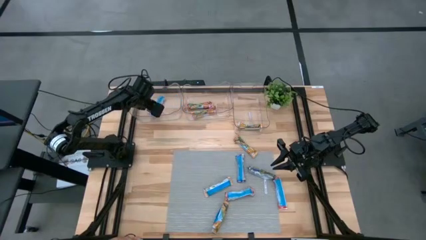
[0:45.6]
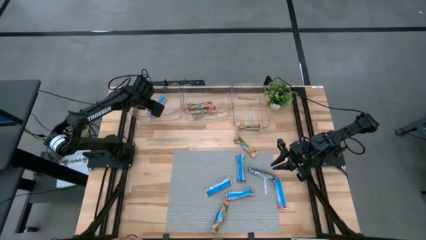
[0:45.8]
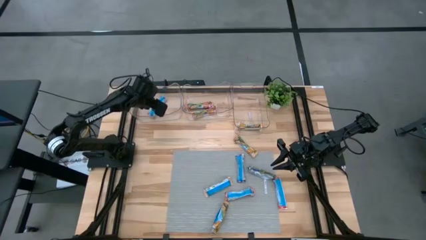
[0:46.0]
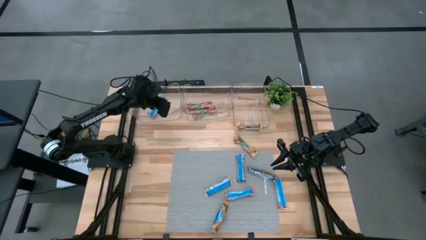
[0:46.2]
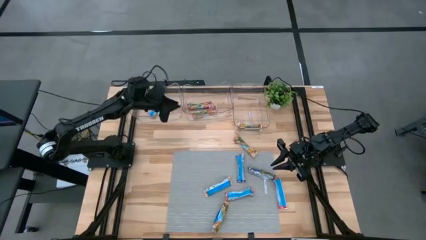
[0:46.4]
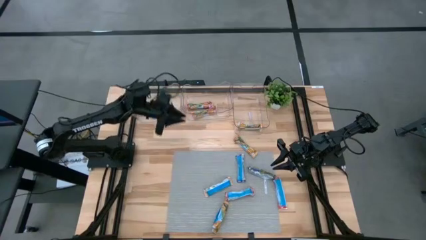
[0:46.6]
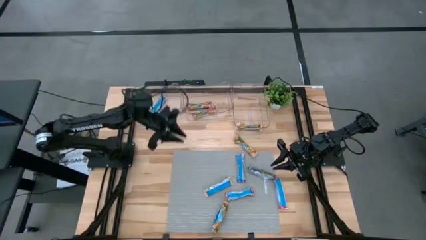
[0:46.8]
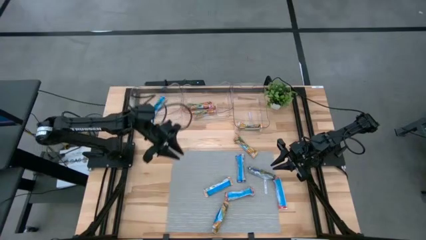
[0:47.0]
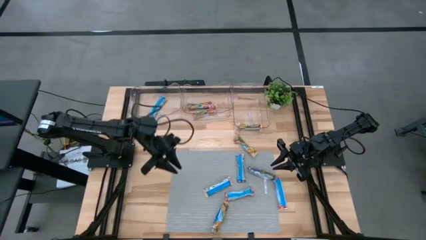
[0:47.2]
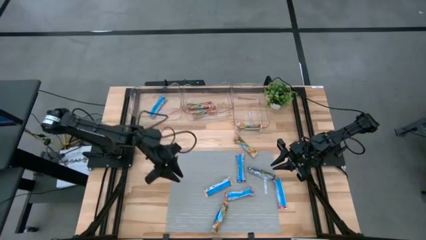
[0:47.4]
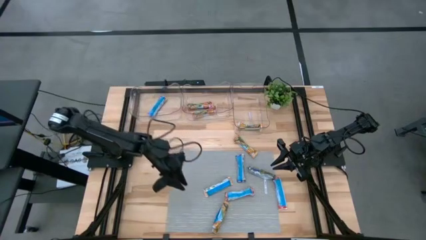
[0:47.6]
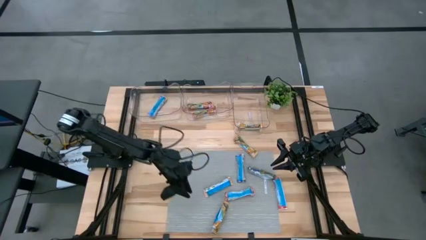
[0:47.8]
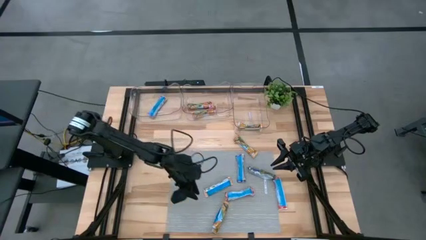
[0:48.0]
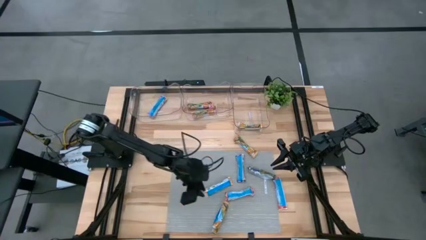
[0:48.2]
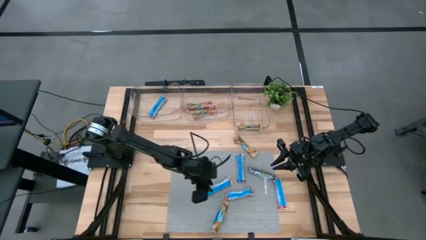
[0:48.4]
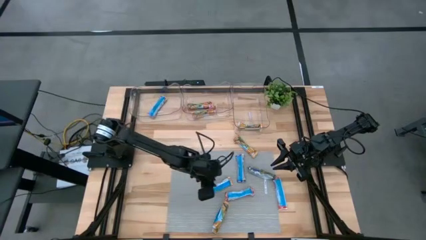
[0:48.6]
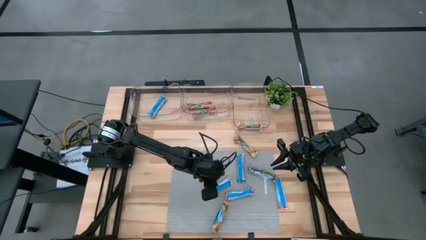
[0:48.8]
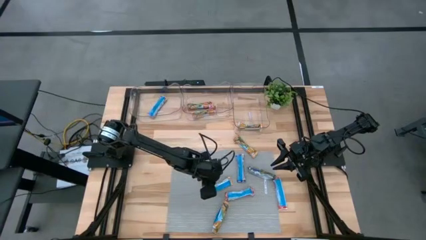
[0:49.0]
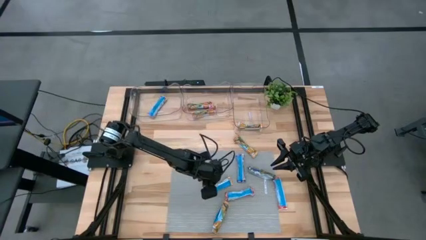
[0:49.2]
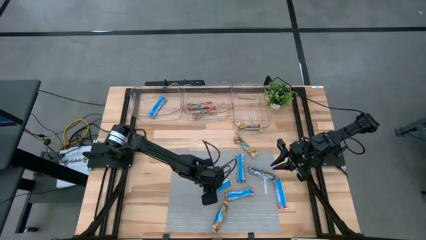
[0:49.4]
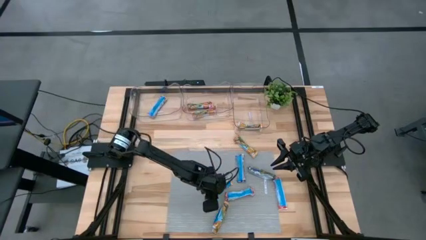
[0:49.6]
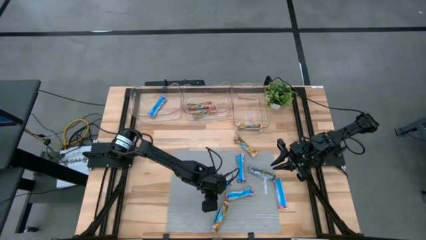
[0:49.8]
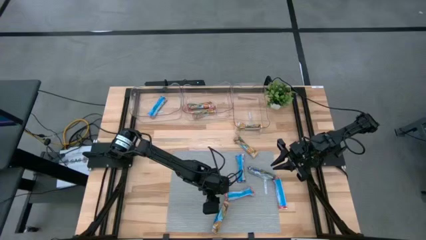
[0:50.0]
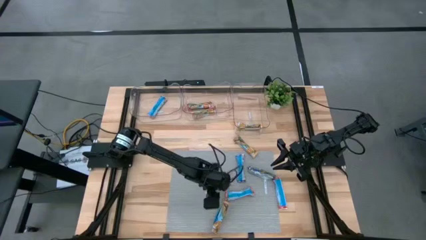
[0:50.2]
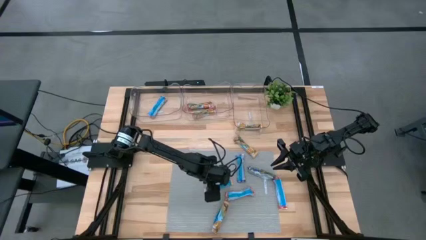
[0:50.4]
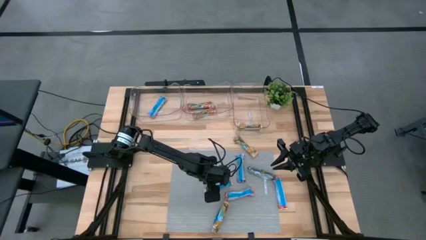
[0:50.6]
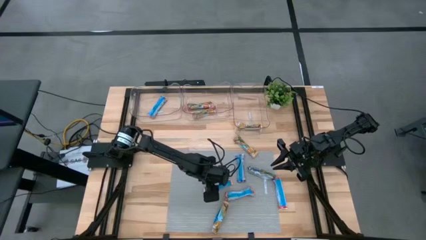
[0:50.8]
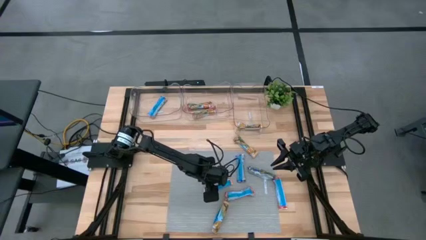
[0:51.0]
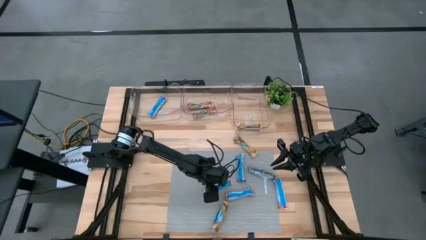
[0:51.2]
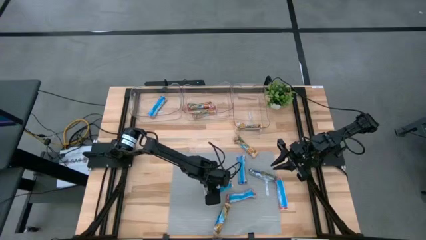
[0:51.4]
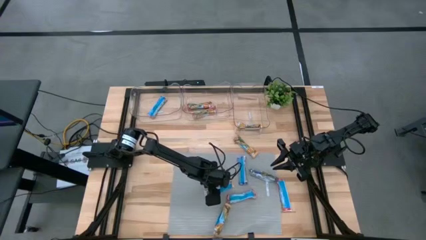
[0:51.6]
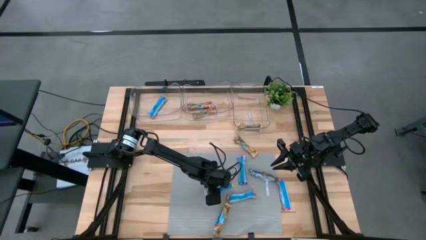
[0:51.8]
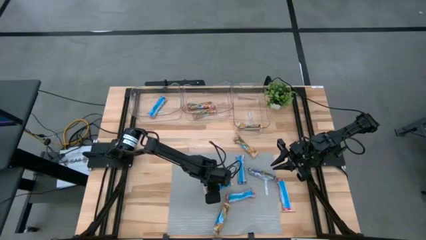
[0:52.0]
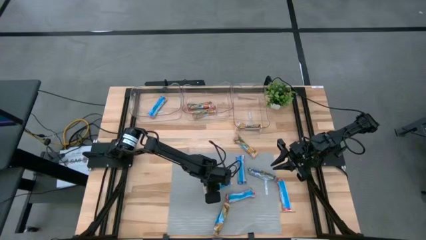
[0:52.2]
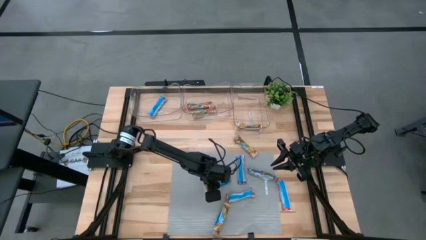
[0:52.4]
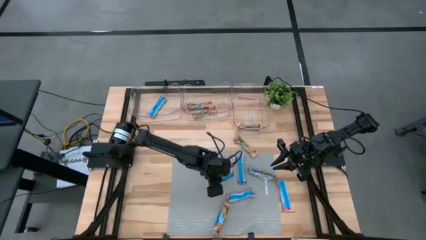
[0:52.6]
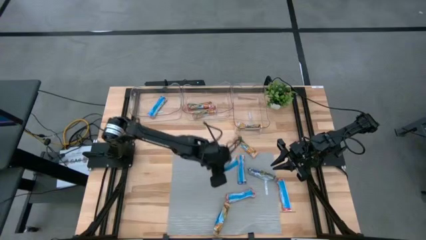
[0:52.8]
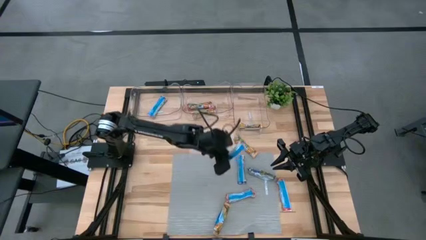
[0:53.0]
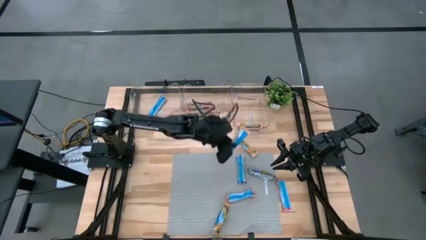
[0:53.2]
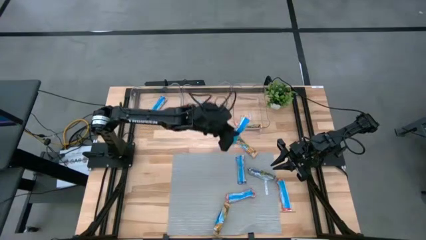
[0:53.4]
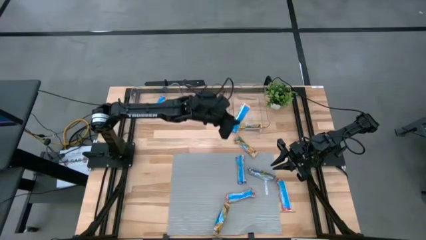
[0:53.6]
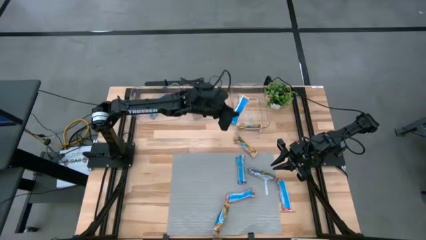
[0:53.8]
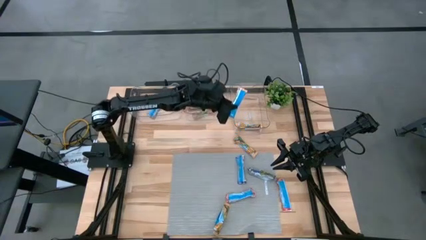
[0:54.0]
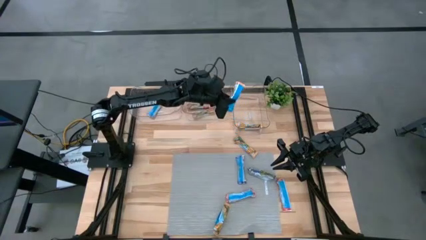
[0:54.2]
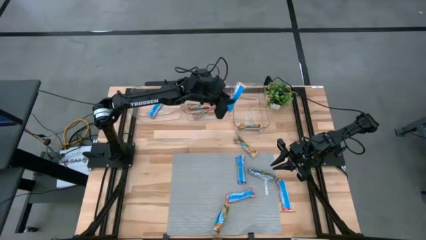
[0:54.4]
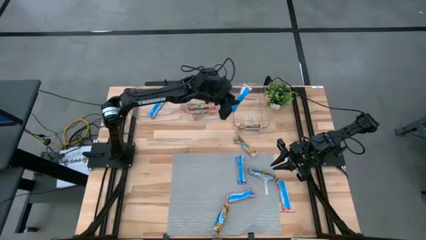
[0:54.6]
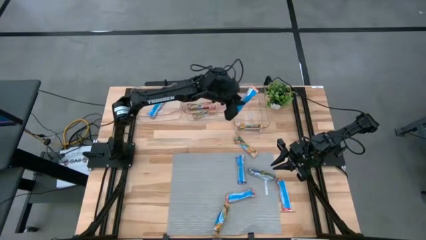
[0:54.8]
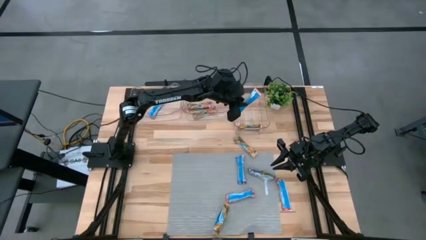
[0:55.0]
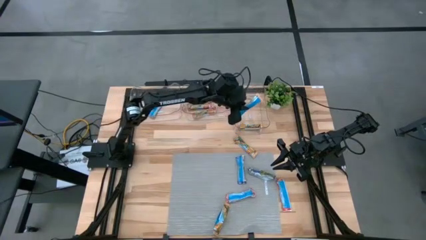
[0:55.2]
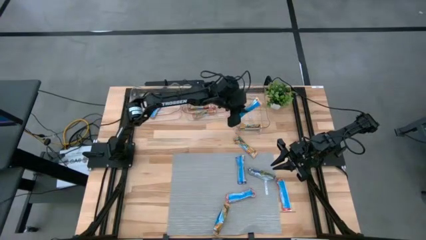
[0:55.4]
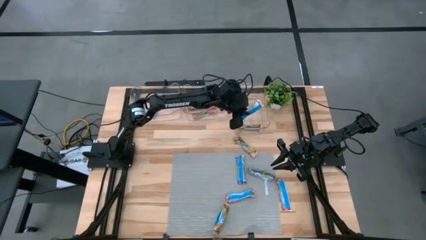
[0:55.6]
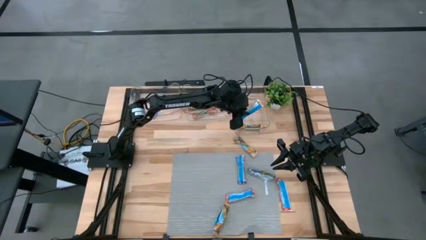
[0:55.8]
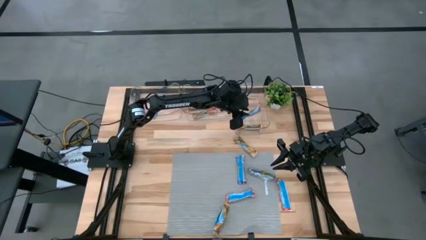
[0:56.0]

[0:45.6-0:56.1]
Task: Pick and place Granola Bars by type
Put the yellow granola bar into the right transparent bin

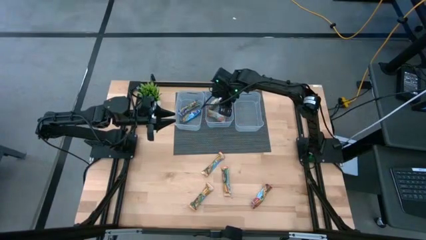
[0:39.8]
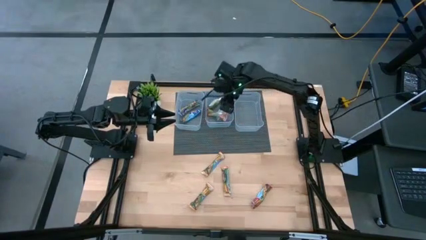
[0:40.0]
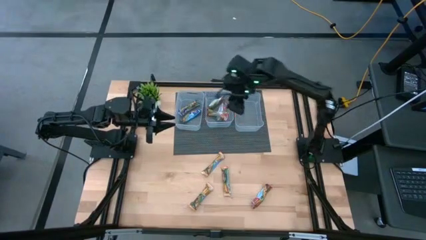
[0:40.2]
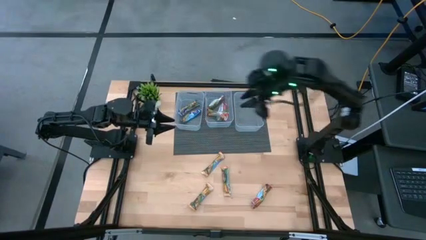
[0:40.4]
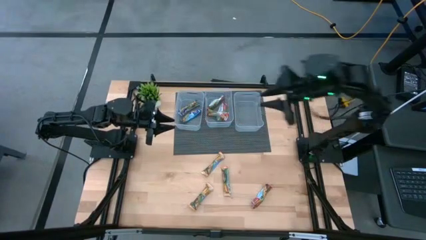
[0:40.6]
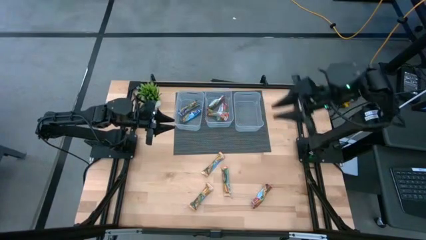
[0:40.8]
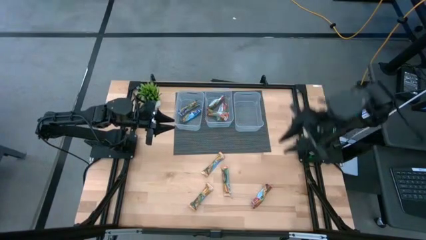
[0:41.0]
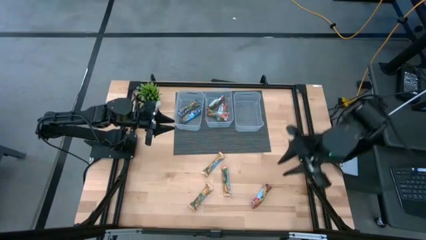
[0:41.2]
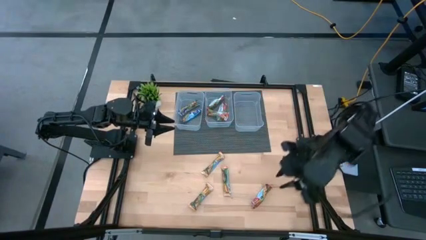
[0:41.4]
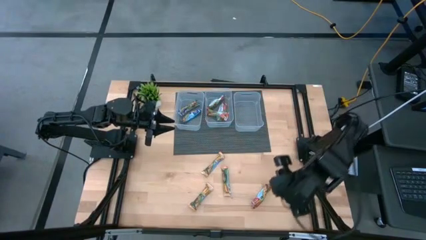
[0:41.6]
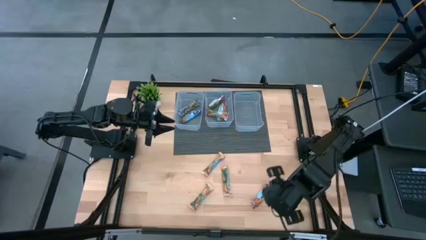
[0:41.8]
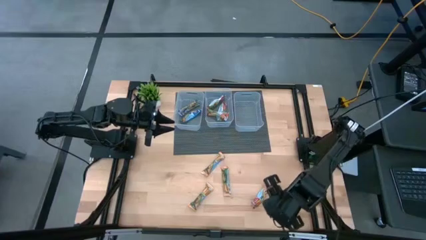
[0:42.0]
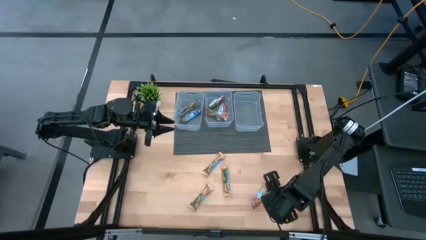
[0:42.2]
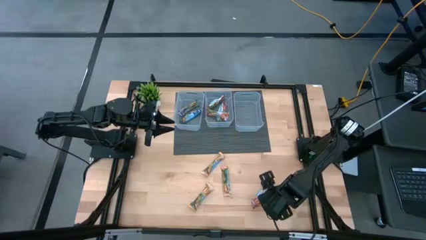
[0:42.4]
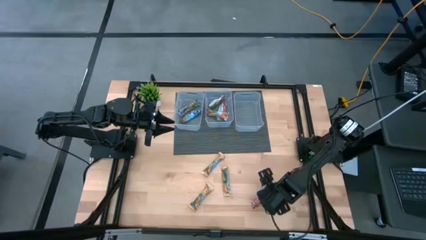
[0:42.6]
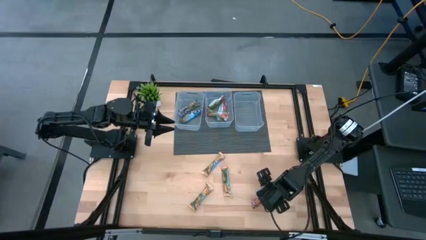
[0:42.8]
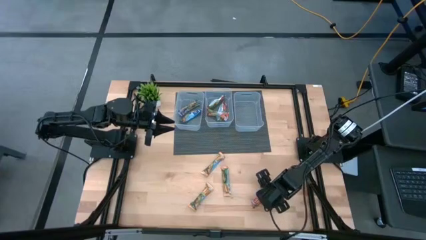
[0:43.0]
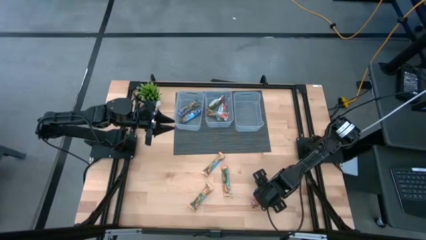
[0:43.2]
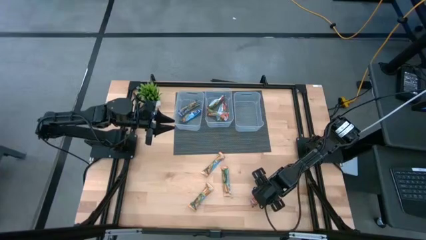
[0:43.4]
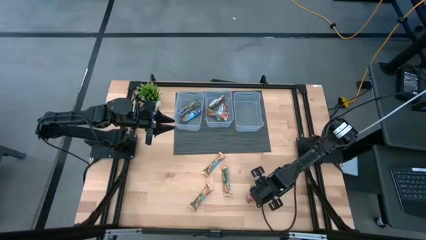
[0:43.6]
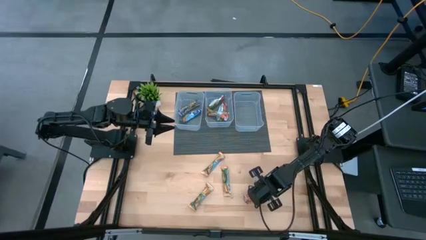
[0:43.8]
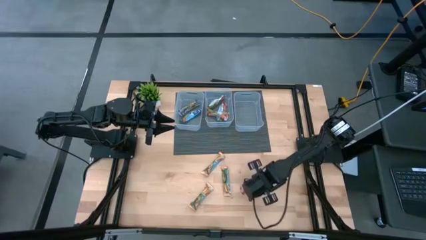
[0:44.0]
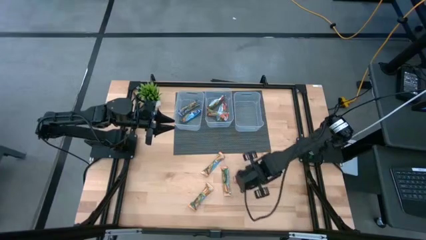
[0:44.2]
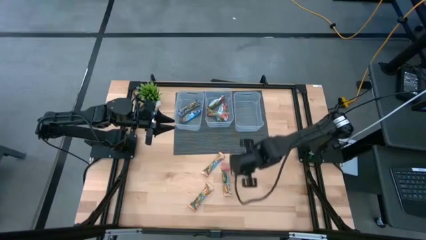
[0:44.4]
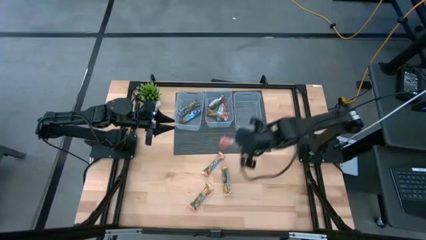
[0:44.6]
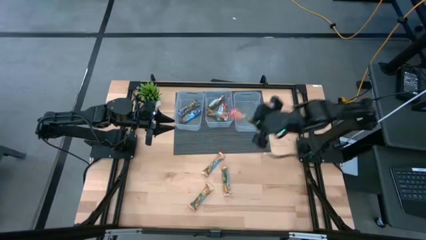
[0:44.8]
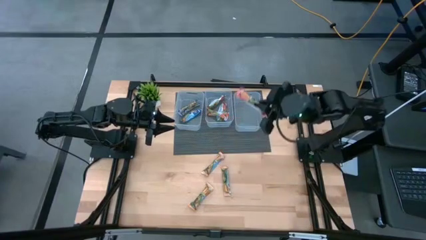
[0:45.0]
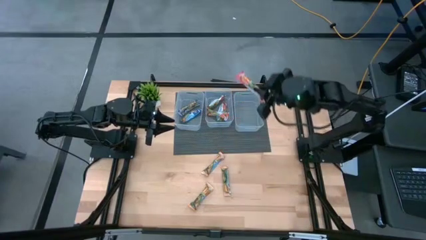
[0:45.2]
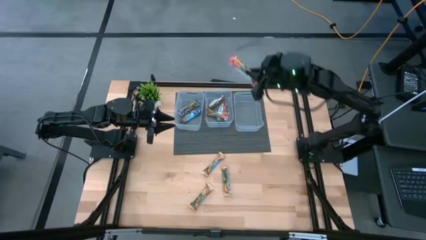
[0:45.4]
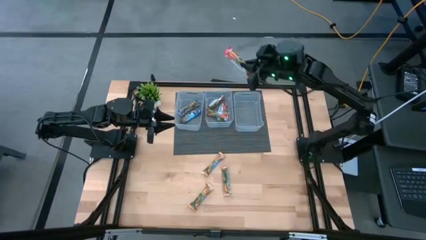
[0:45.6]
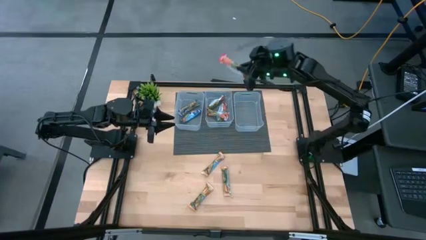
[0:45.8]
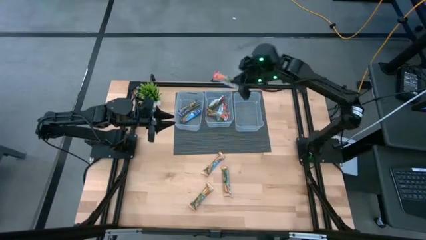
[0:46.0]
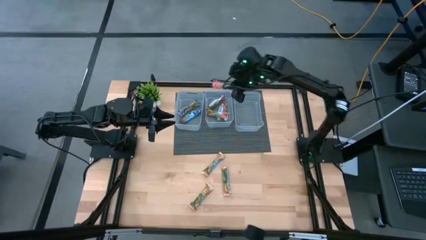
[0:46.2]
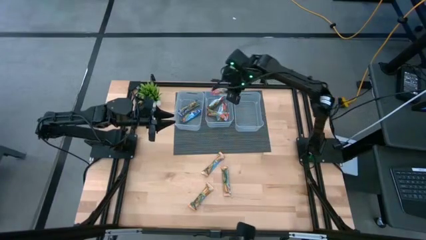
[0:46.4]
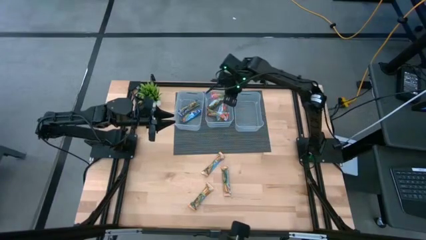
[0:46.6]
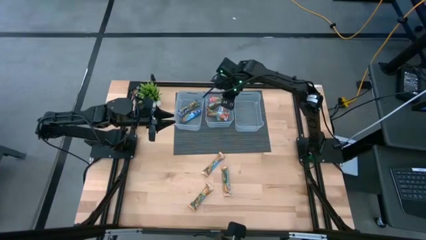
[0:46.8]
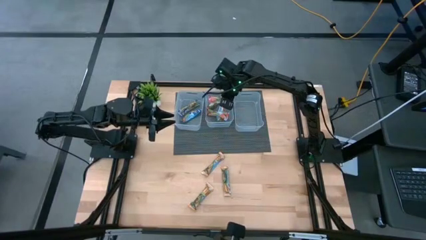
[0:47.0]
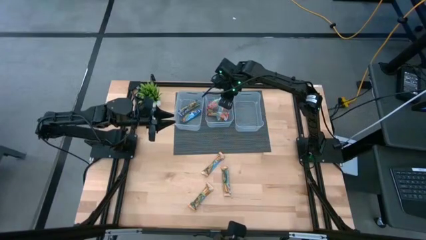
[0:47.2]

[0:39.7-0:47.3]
Task: Pick and place Granola Bars by type
Put the red granola bar into the middle transparent bin
